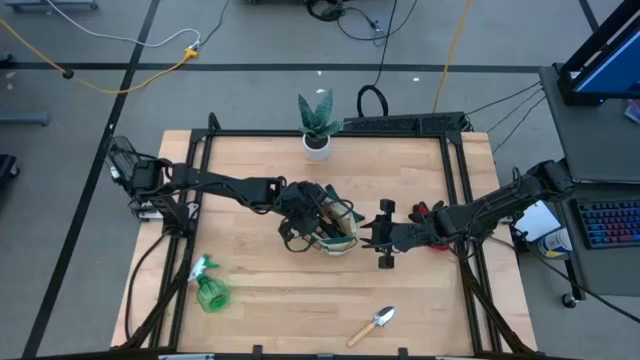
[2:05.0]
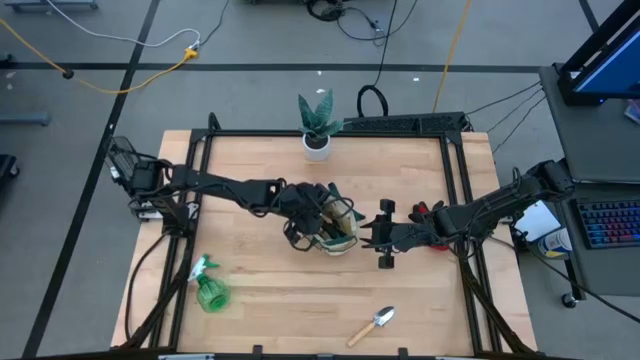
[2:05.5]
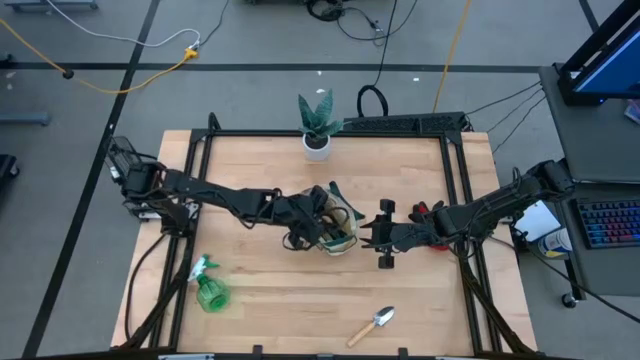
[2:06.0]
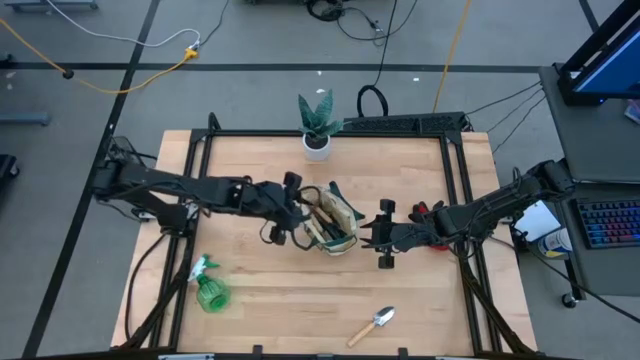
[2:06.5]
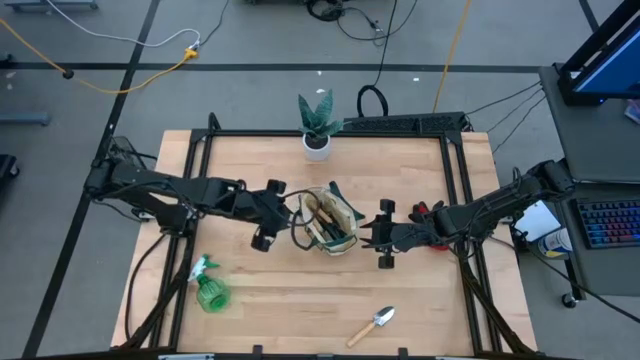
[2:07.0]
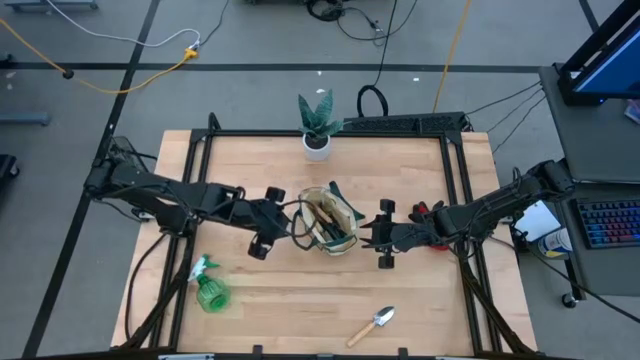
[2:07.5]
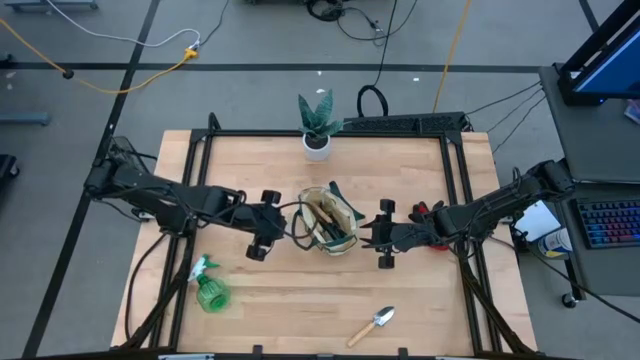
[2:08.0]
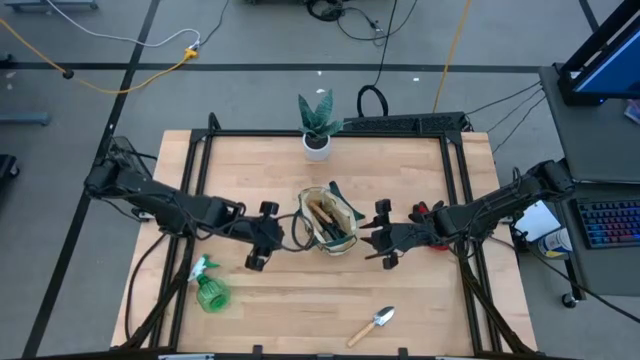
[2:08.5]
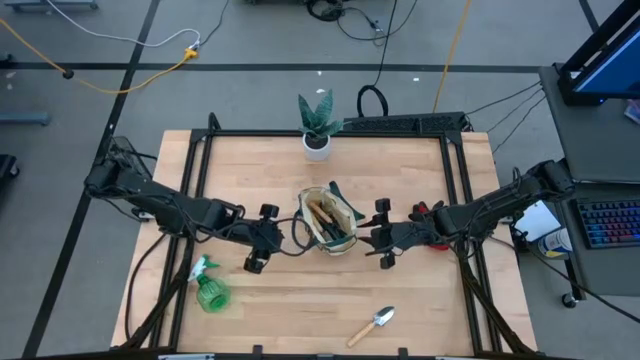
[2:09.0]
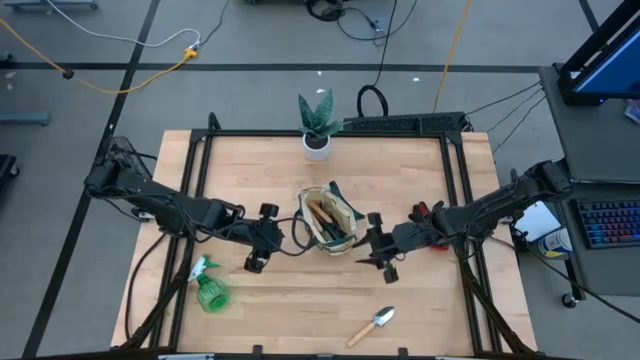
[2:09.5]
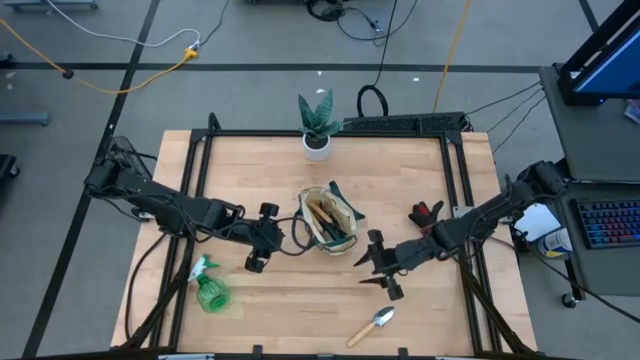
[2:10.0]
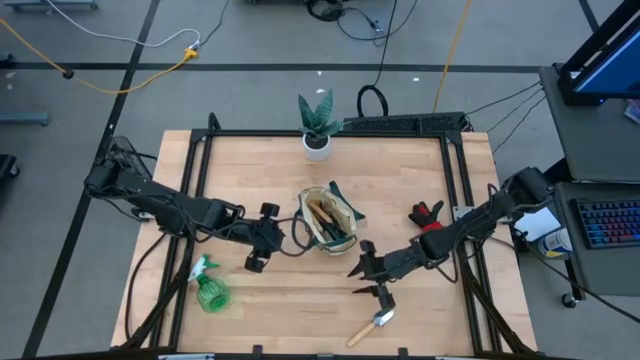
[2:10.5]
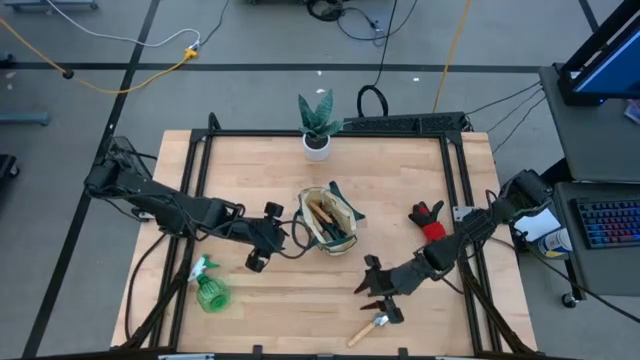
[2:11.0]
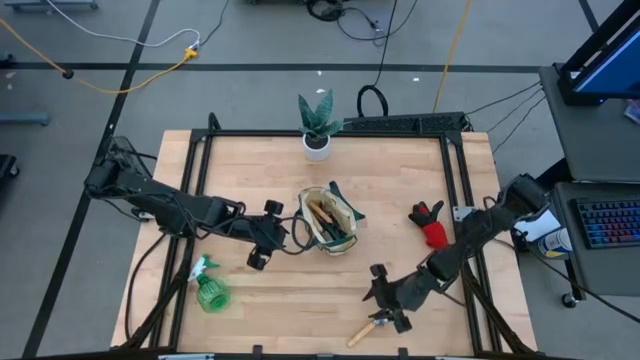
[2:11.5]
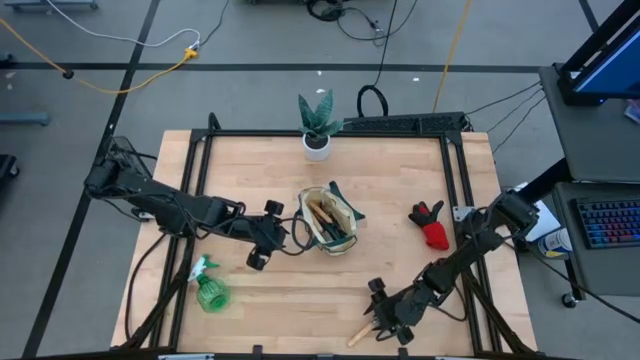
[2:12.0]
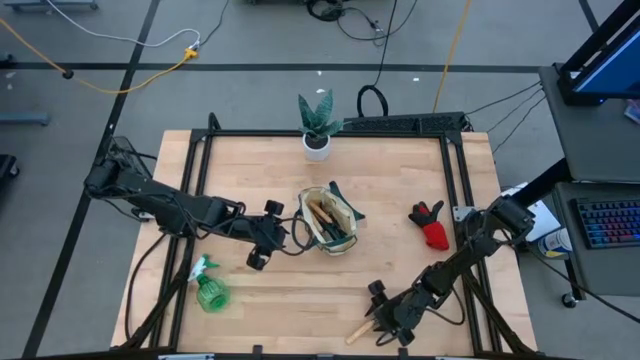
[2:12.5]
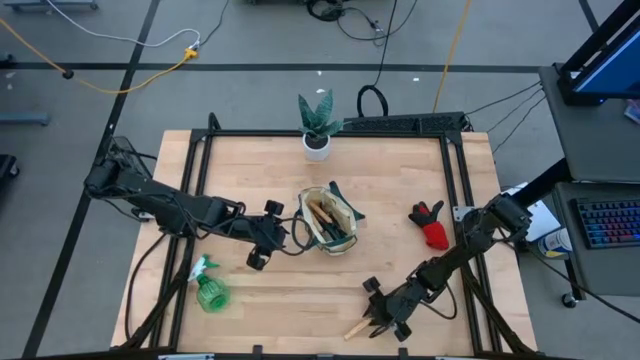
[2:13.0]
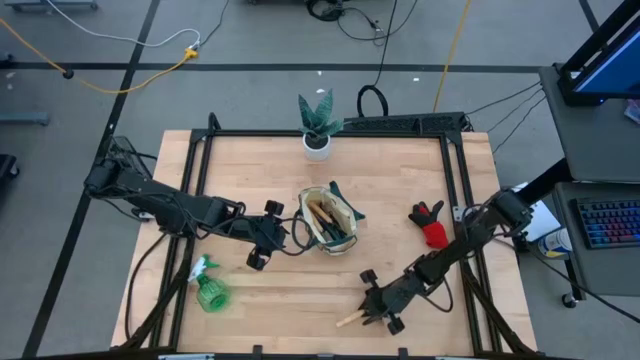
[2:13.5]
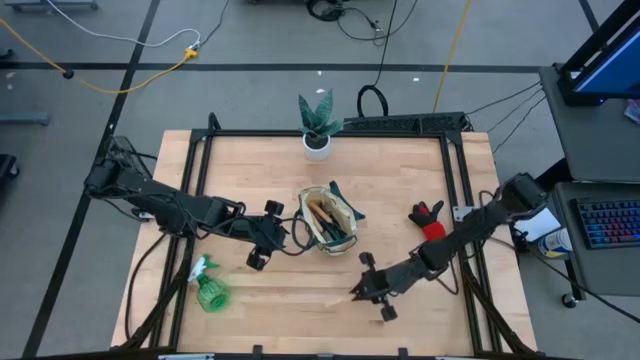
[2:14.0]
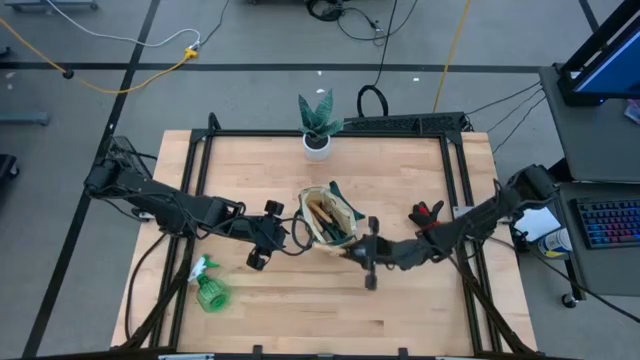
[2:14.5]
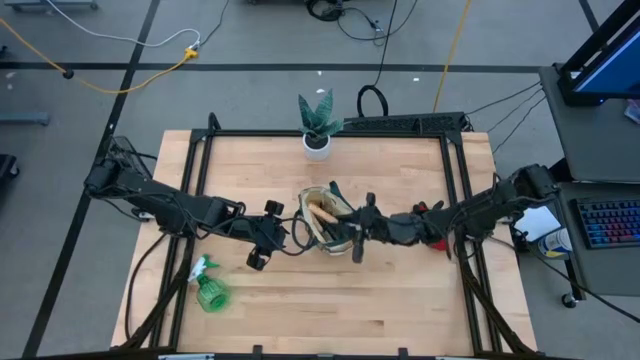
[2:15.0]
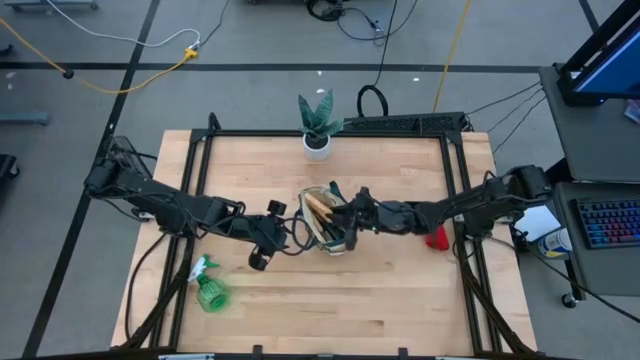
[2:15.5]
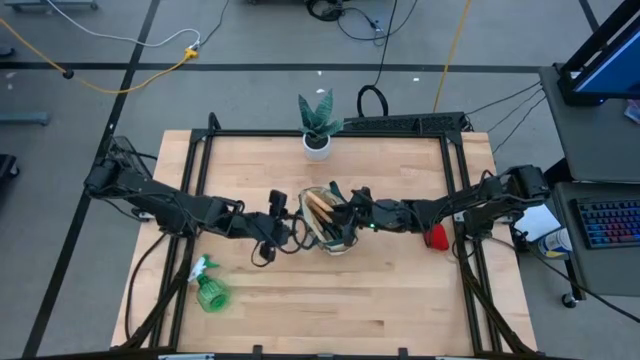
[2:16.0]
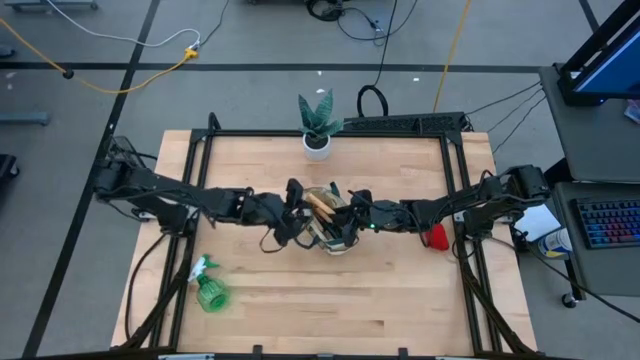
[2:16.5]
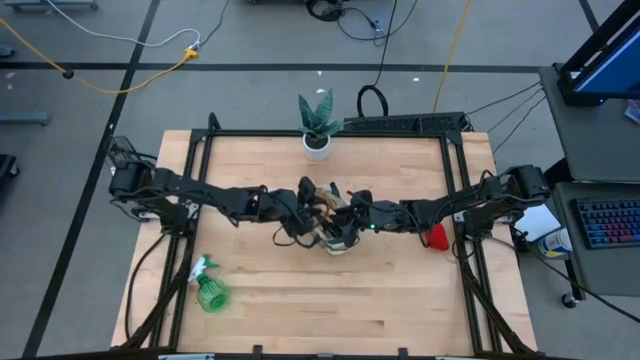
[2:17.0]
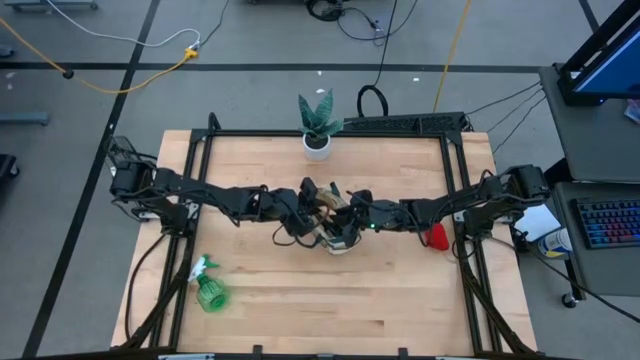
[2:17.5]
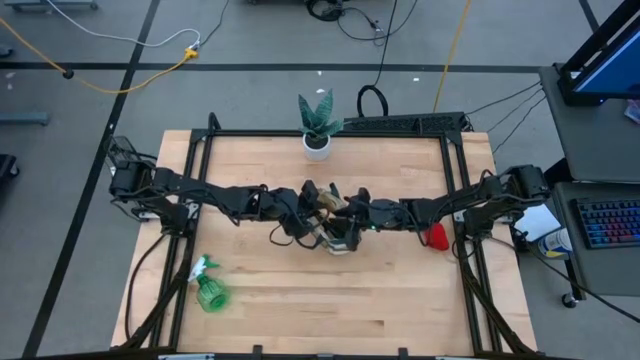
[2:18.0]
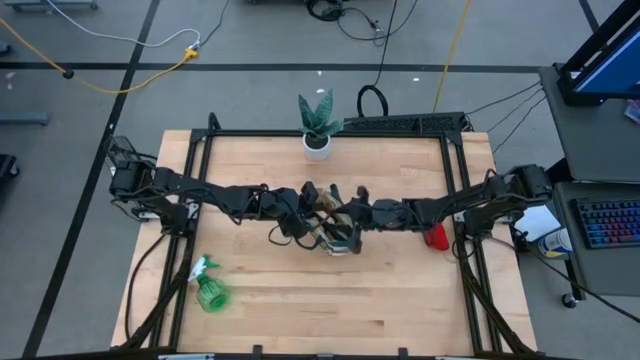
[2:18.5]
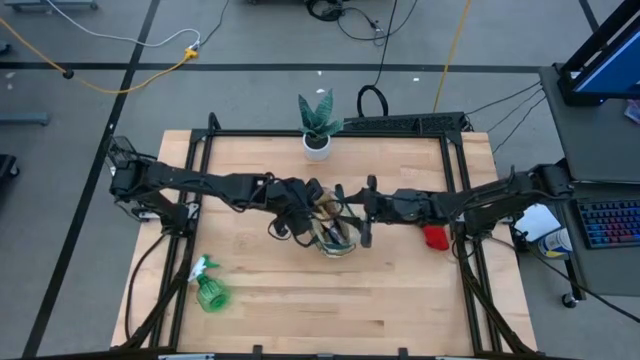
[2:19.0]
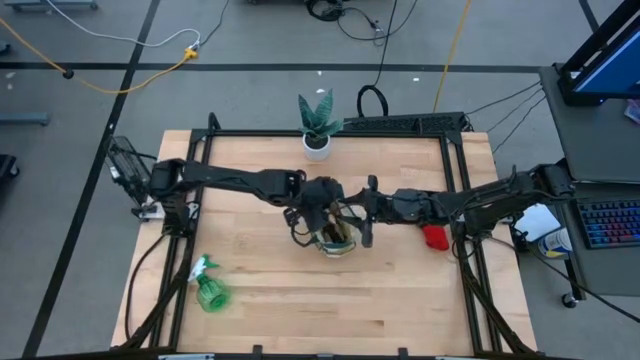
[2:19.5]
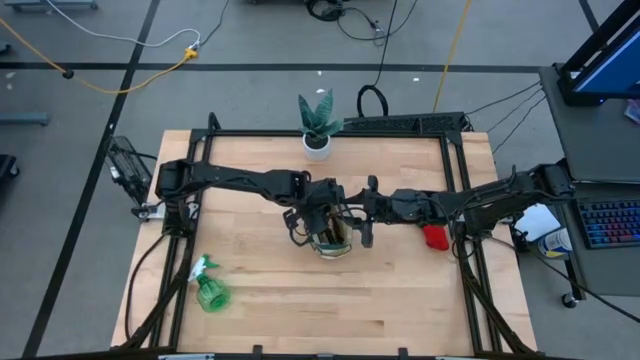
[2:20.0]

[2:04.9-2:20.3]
Task: Pick & Place Garden tools in Gardening bag
Put the brown trowel into the gardening bag

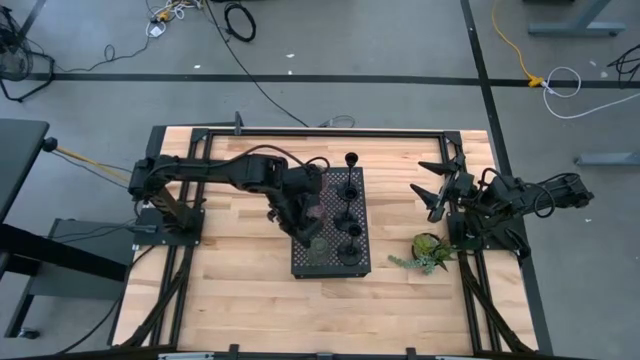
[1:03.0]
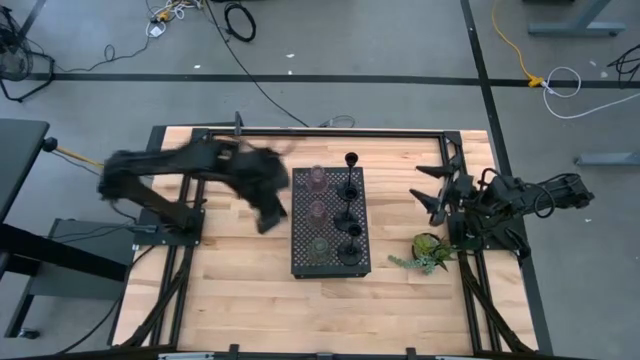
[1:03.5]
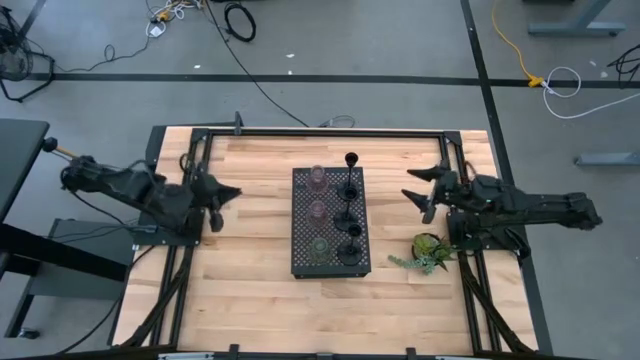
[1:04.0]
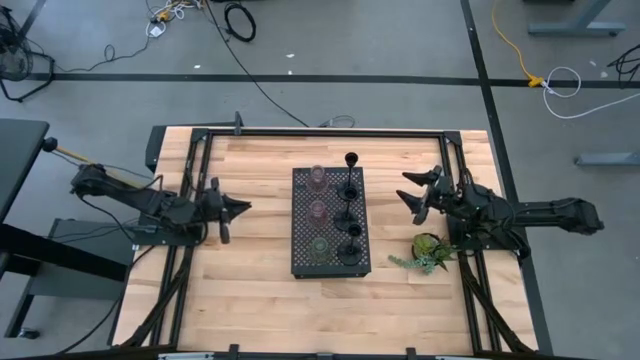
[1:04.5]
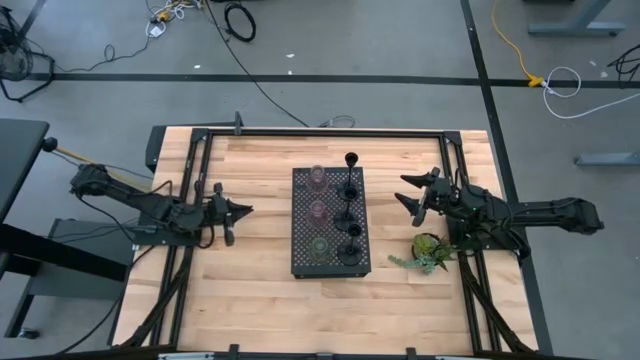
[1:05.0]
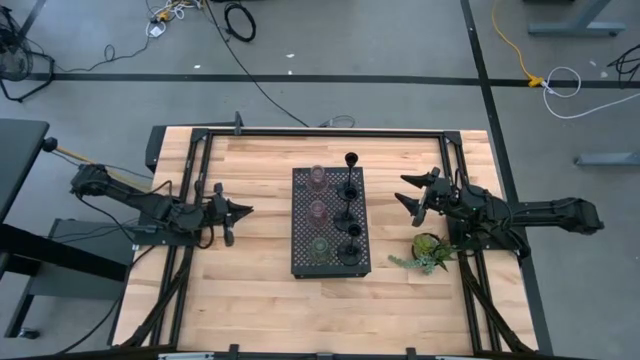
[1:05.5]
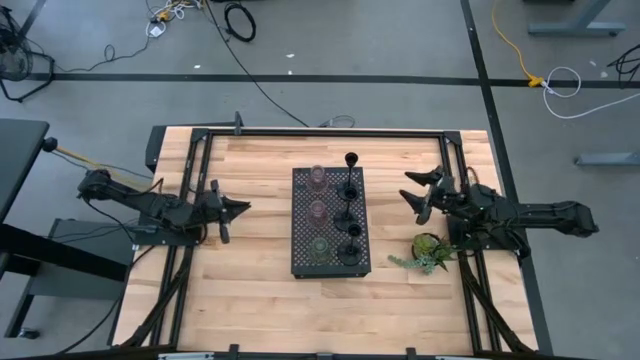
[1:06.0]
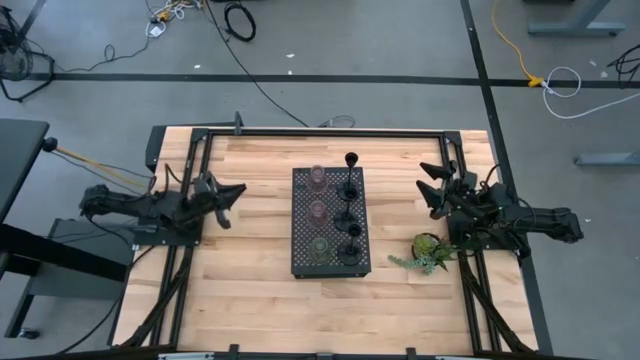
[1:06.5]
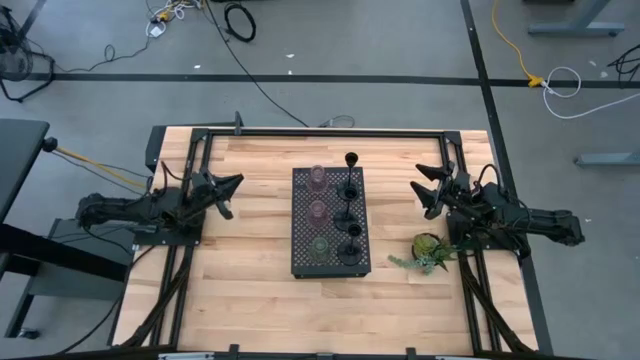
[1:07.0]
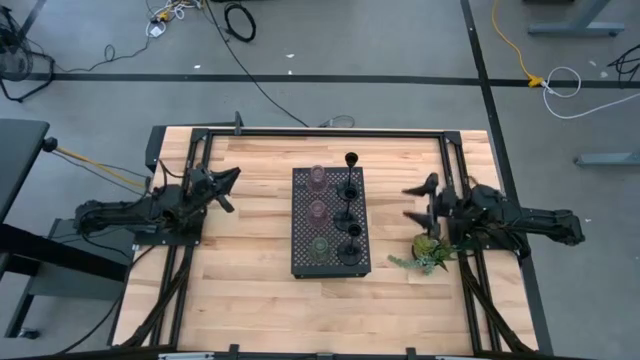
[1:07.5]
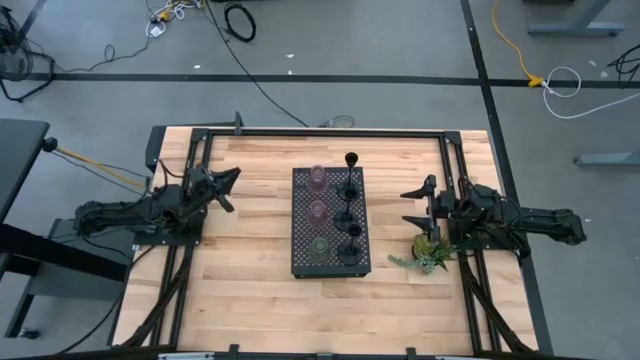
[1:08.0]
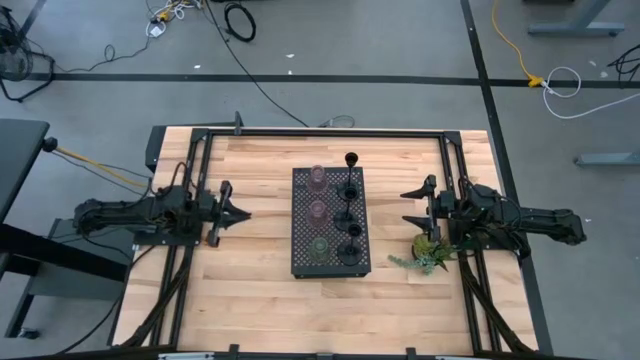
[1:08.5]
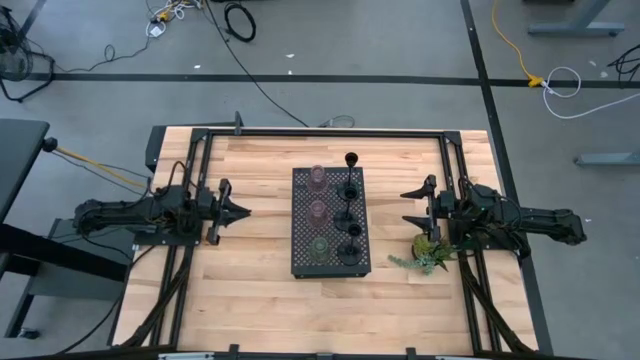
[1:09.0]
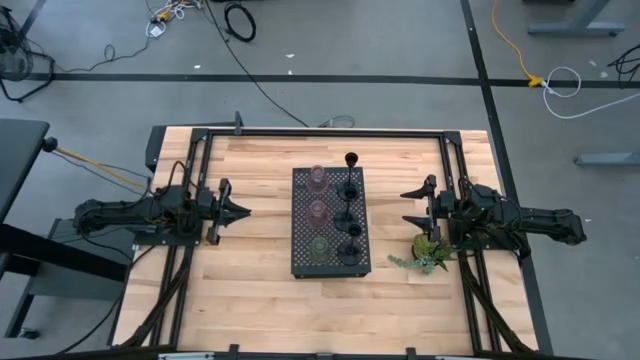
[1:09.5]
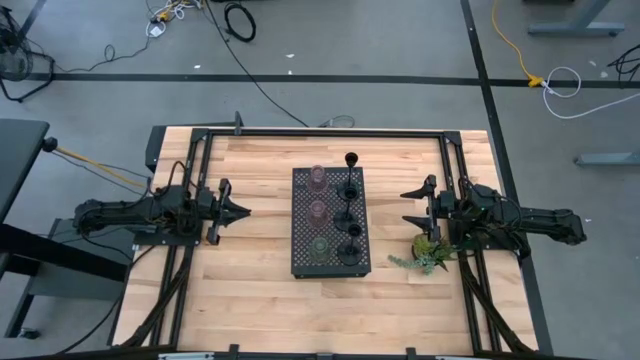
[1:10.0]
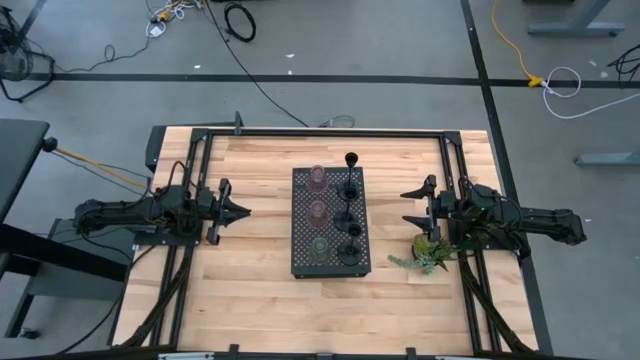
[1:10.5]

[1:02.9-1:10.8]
Task: Pick & Place candle stick holders
Return to Home Position
